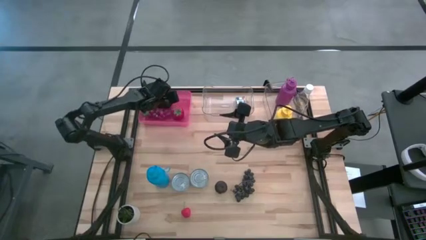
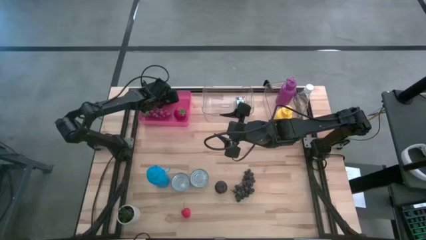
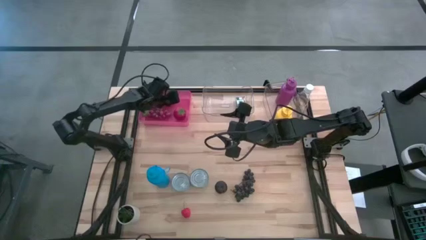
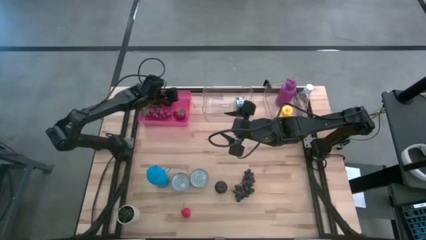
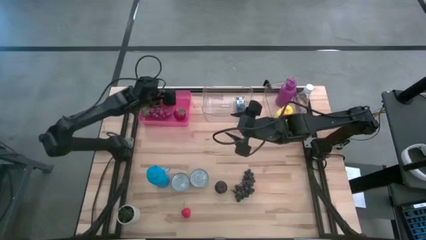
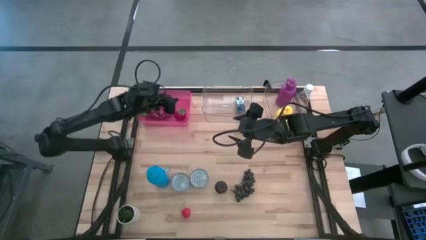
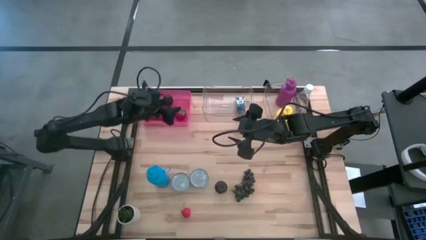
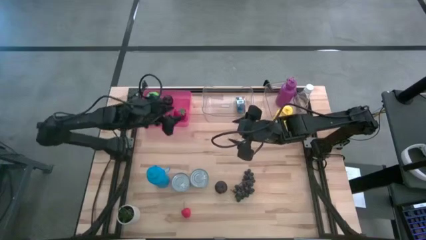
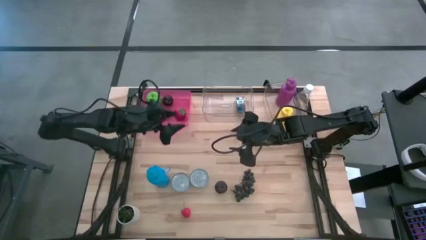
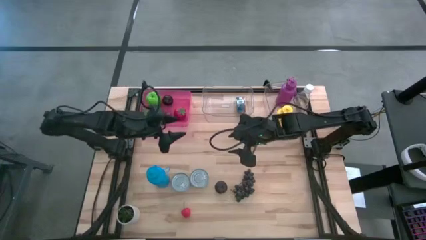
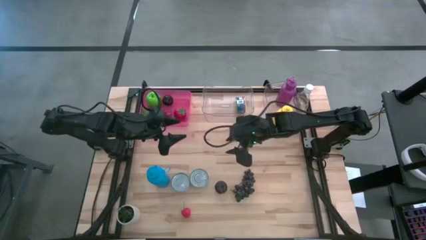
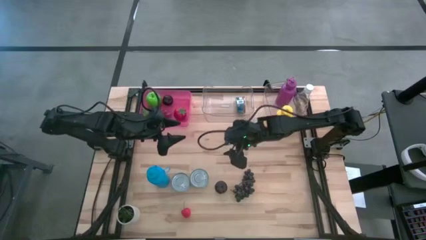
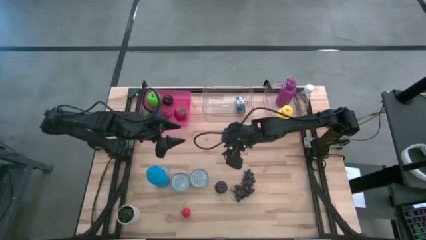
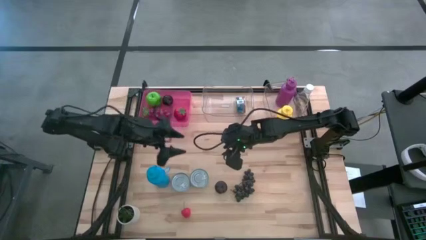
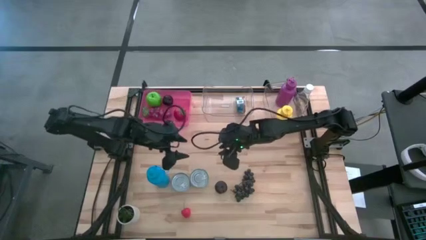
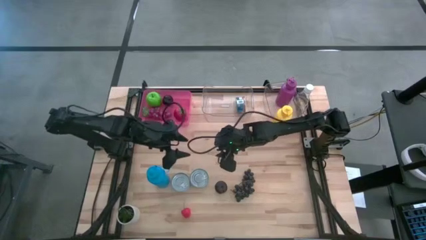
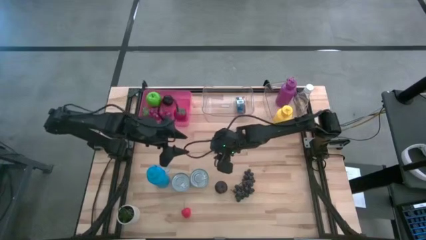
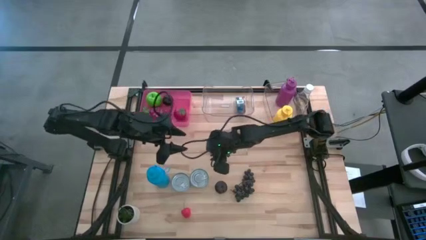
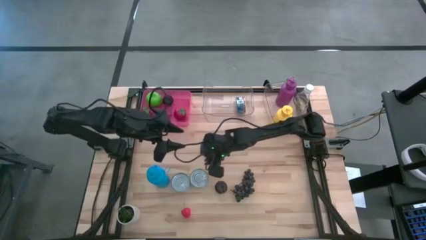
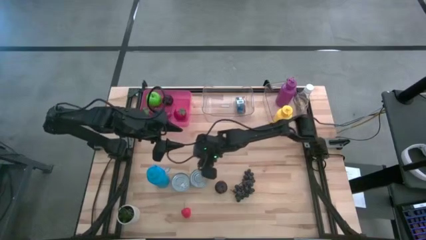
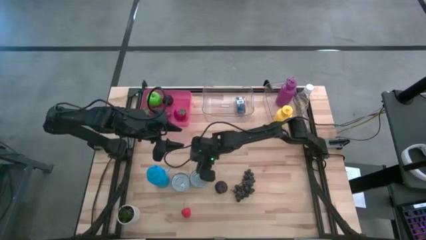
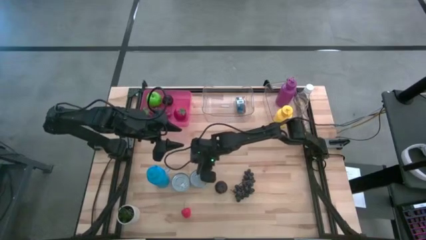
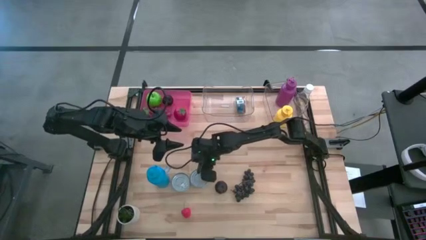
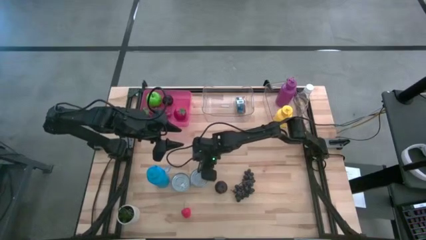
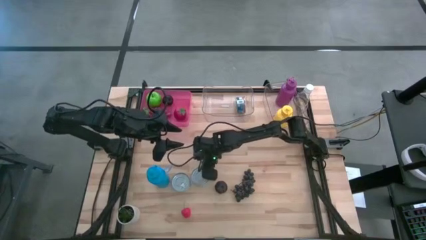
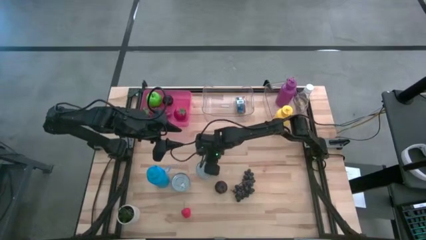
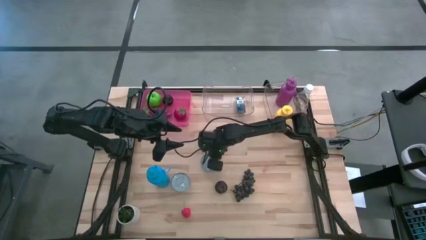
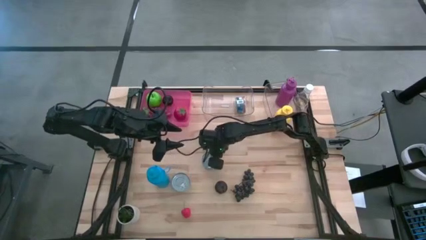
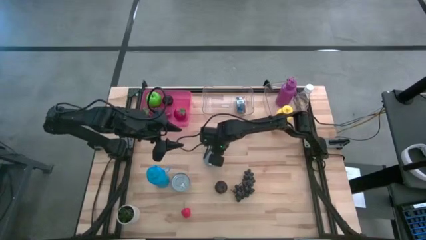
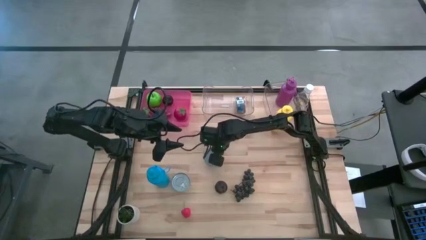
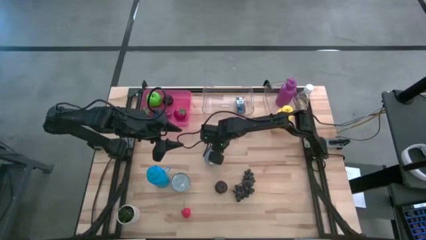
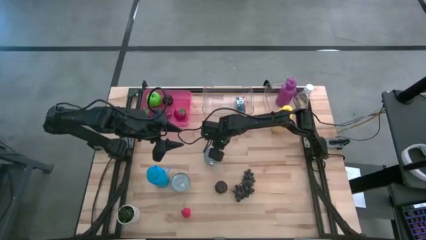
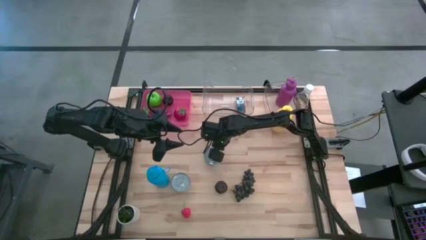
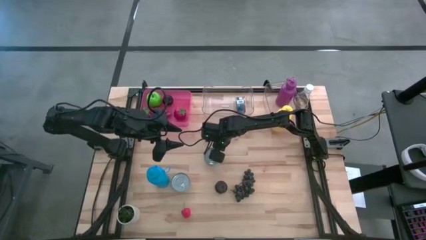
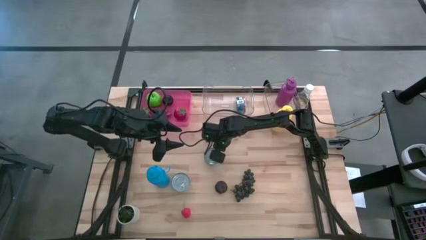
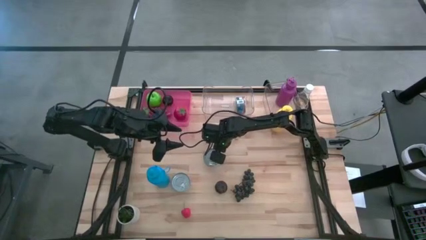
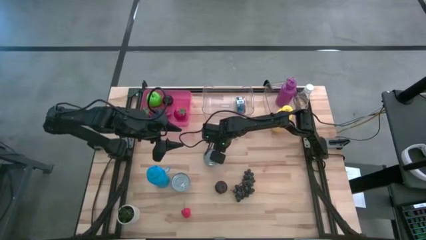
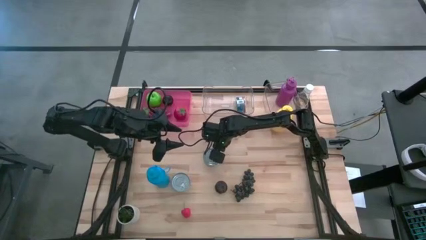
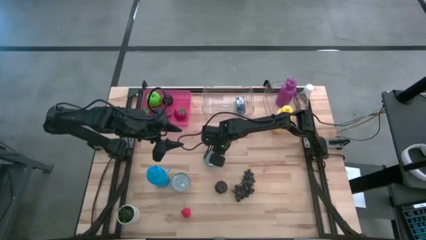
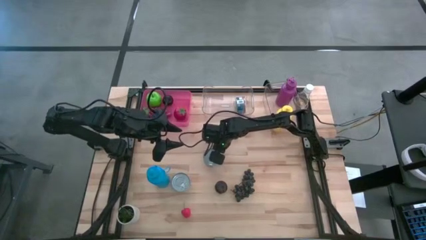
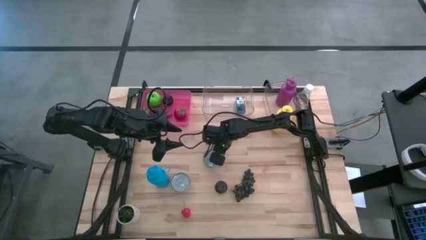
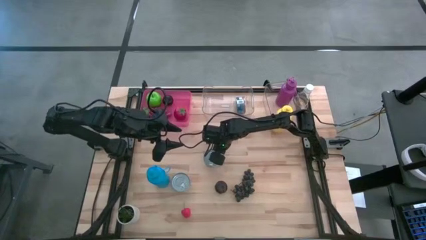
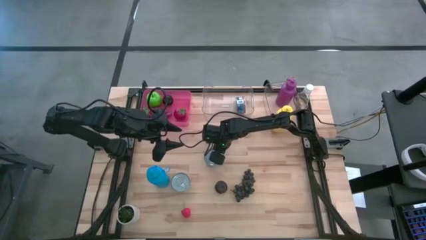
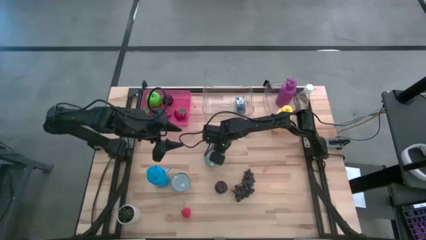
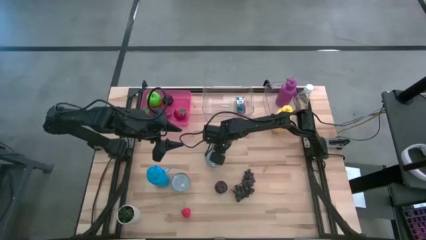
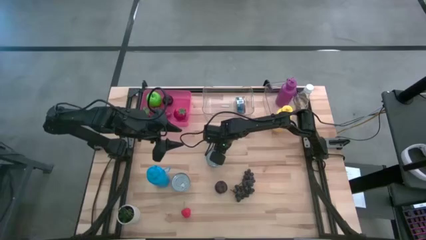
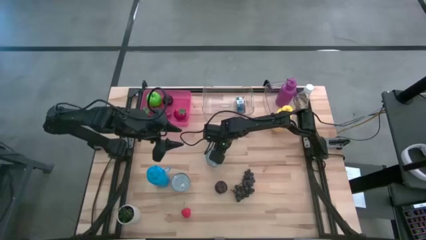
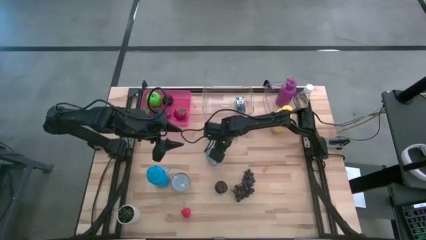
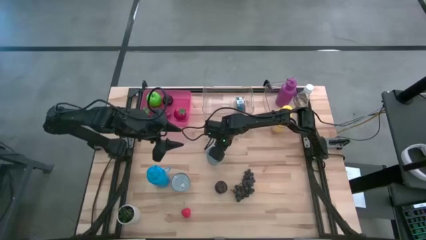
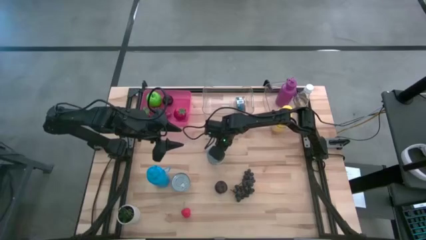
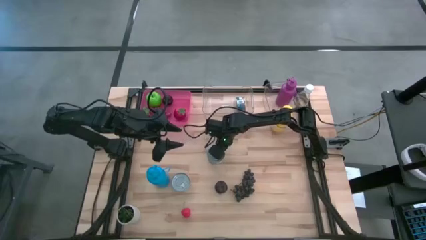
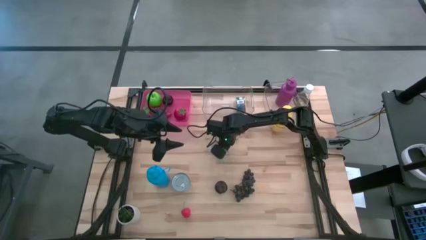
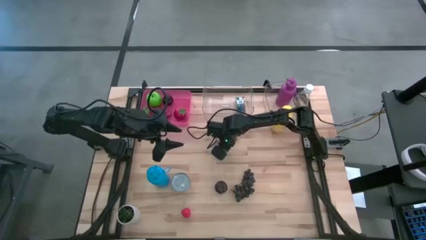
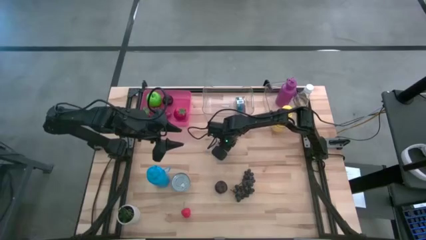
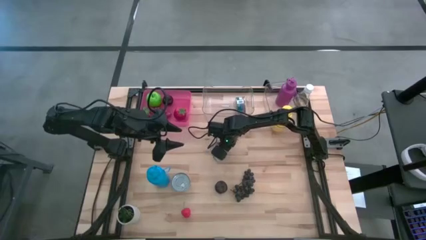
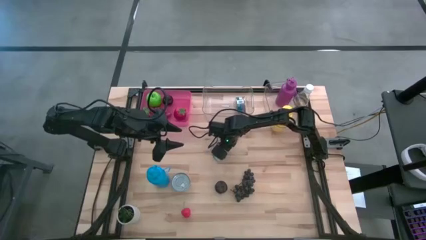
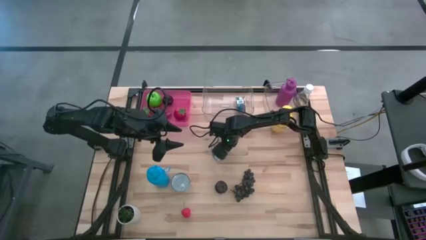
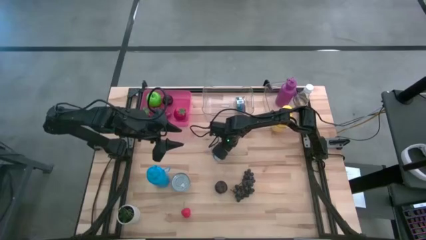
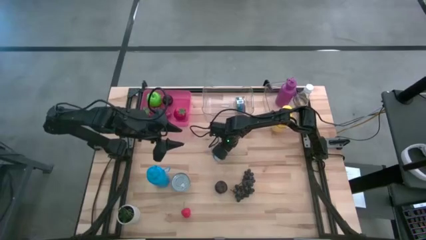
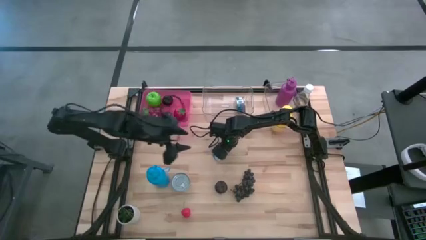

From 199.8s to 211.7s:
Task: Pick & Place Food Item
Put the yellow and blue tuna can into the left transparent bin

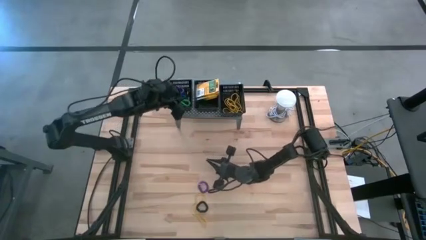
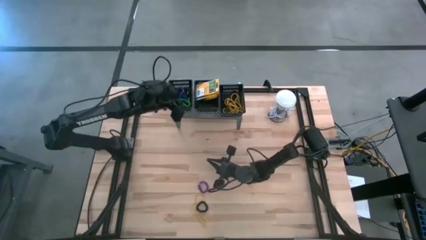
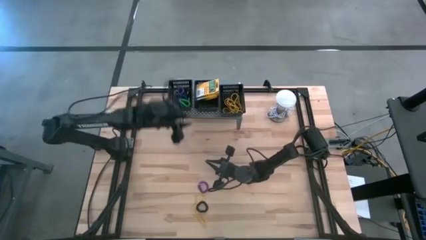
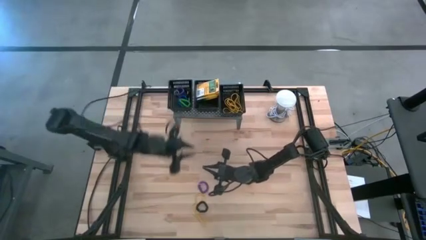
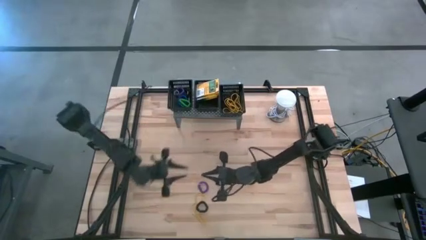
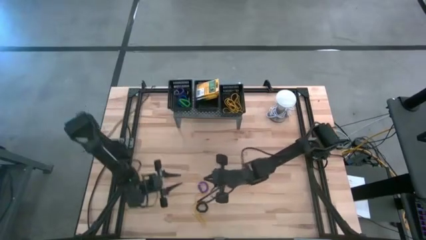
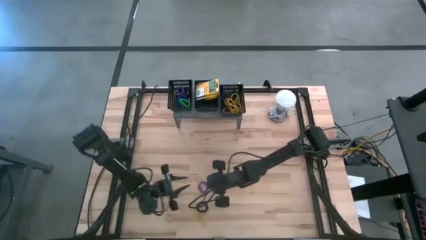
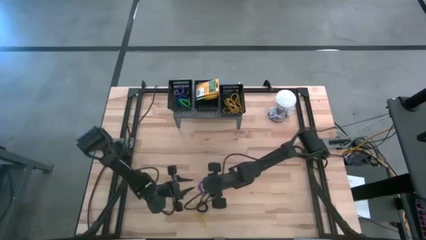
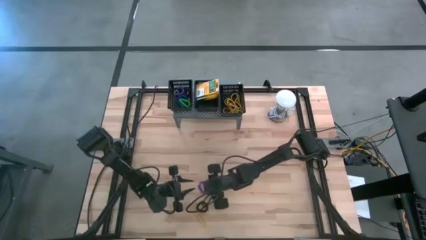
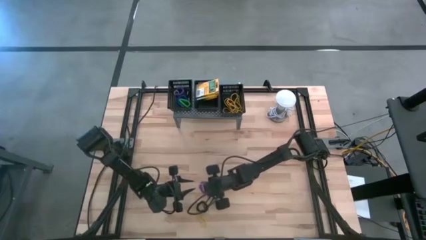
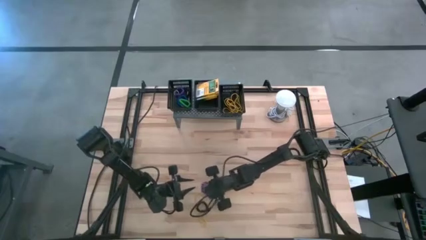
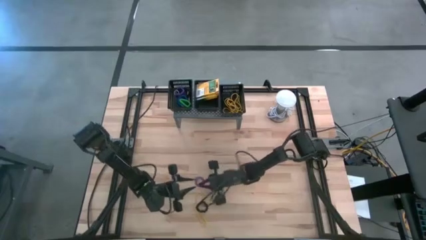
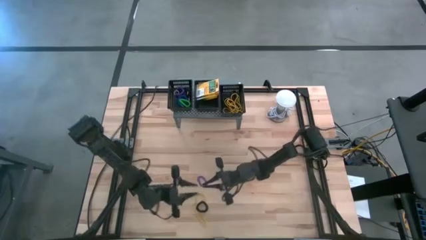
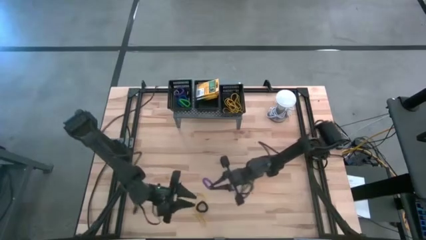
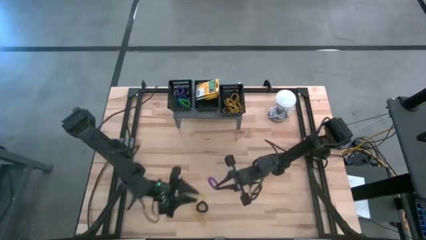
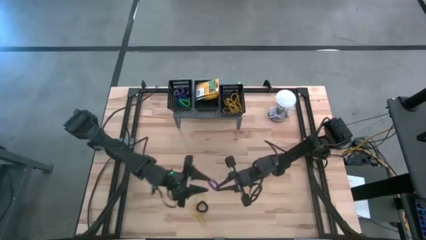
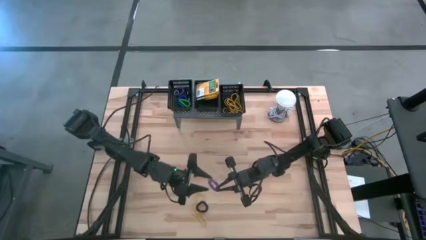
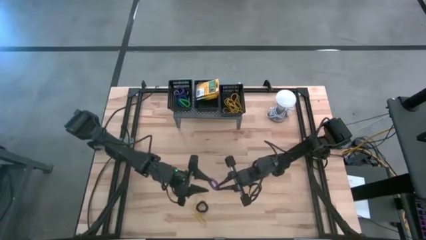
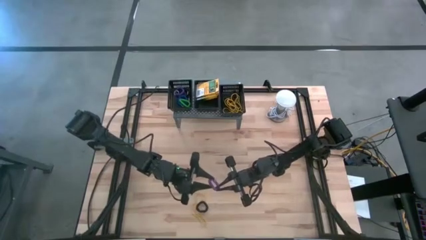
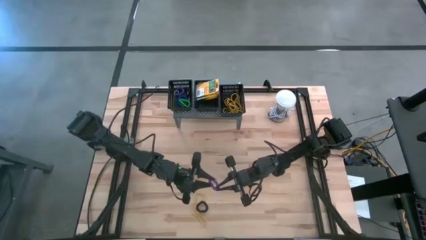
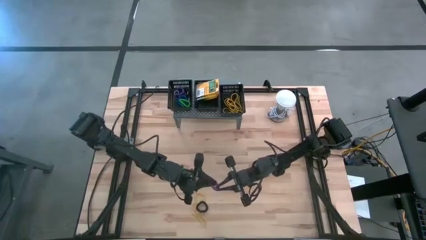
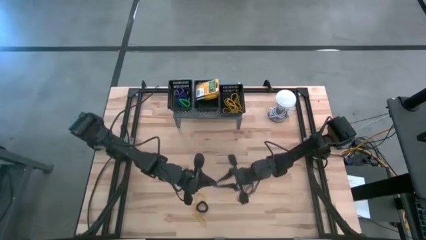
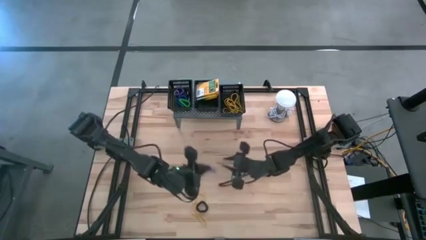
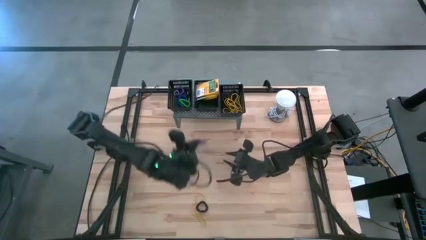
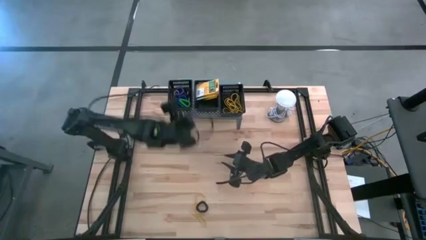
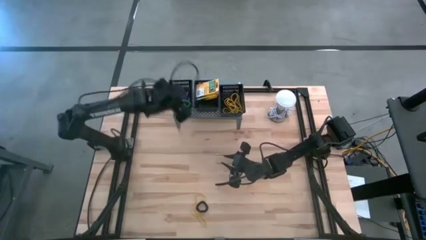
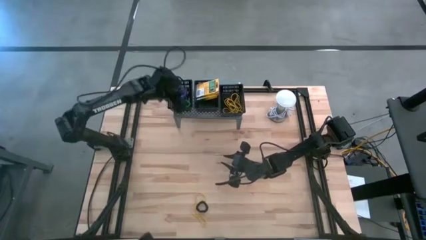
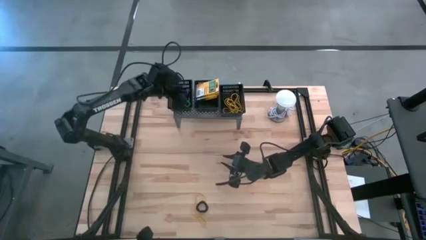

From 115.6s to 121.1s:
Task: Pick & Place Office Desk Supplies
Put the violet spring keychain into the left black bin on the shelf
